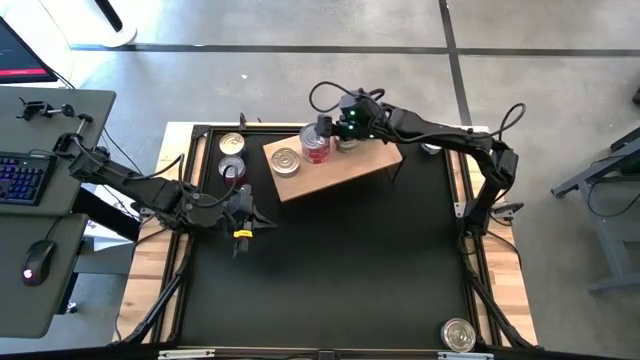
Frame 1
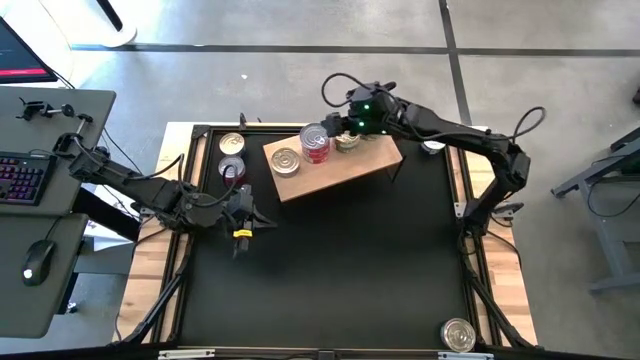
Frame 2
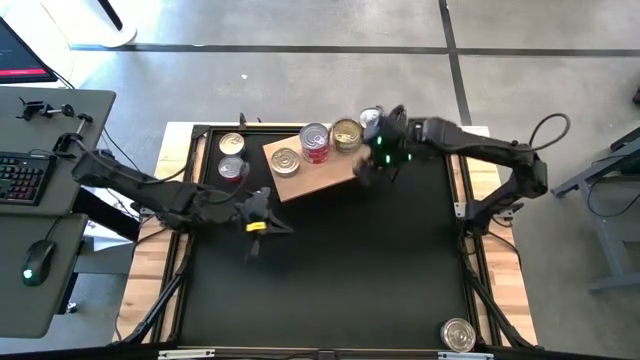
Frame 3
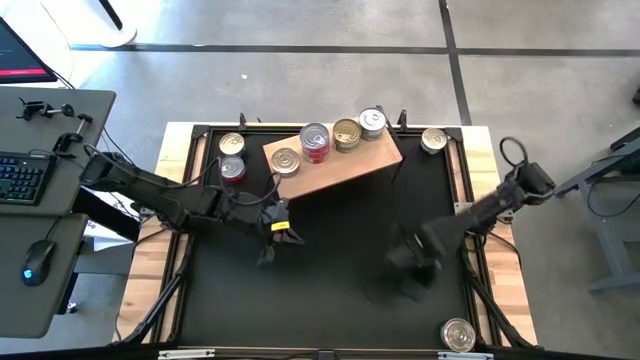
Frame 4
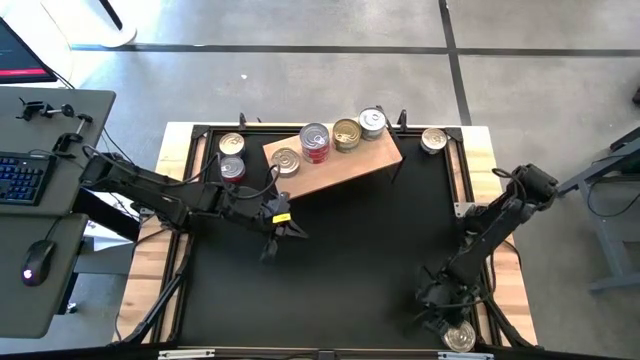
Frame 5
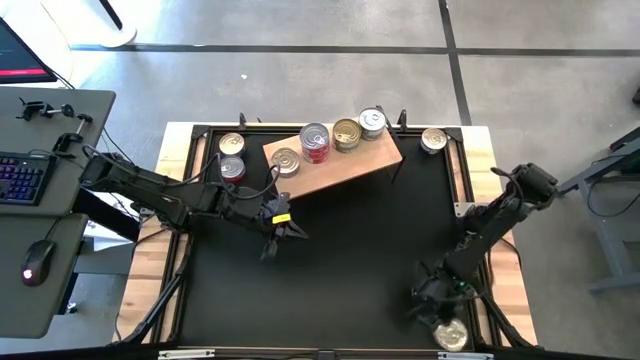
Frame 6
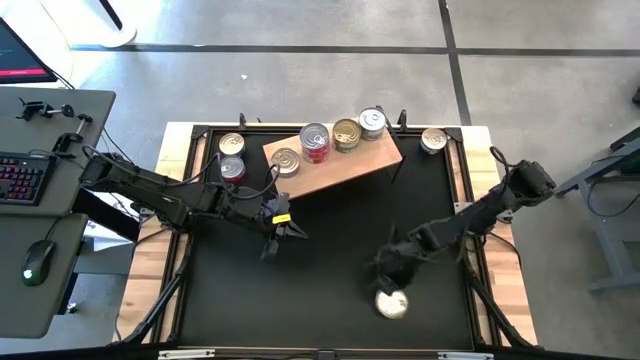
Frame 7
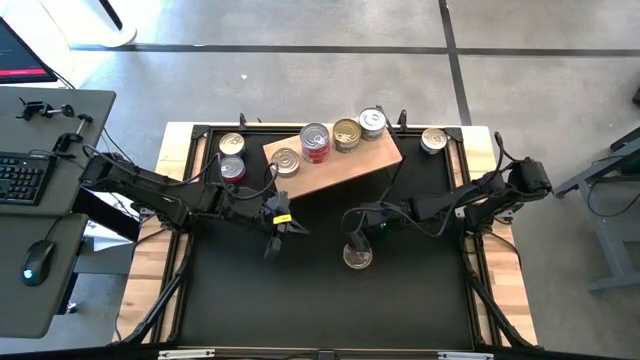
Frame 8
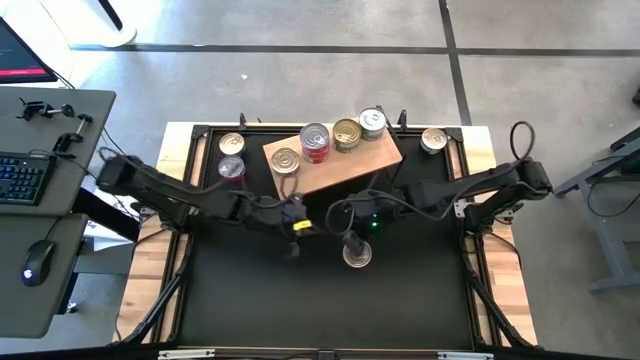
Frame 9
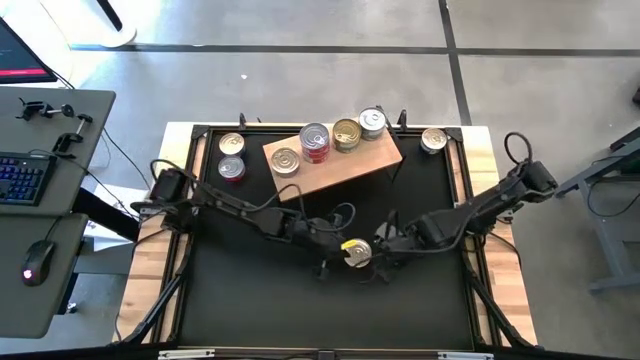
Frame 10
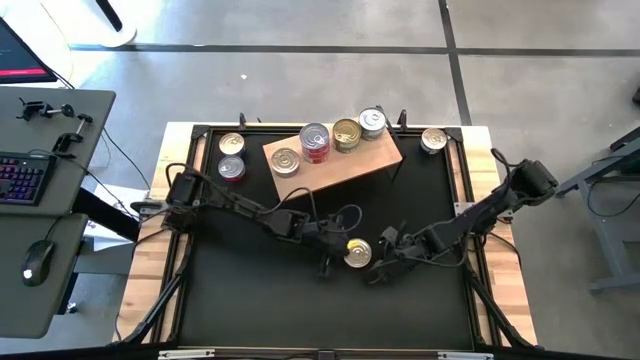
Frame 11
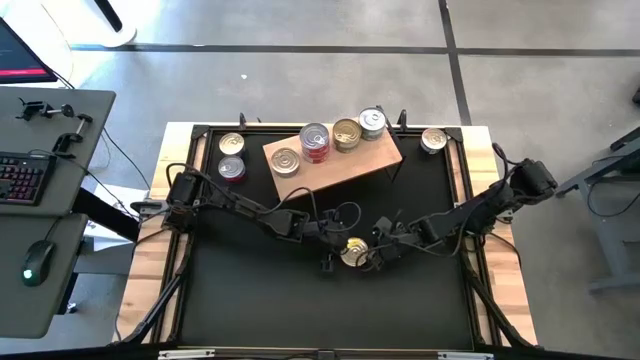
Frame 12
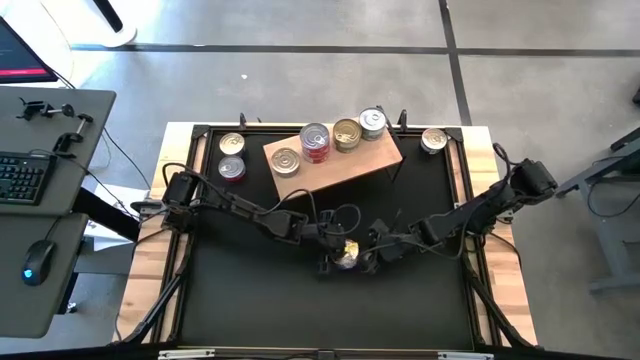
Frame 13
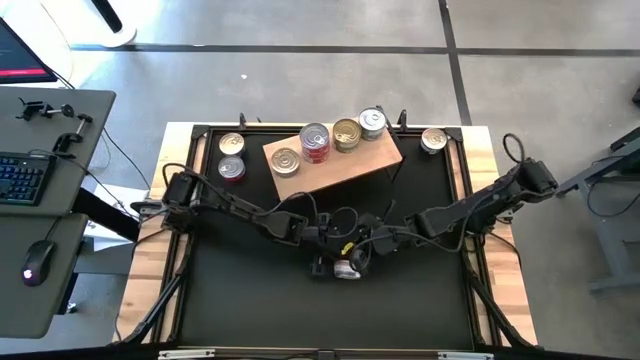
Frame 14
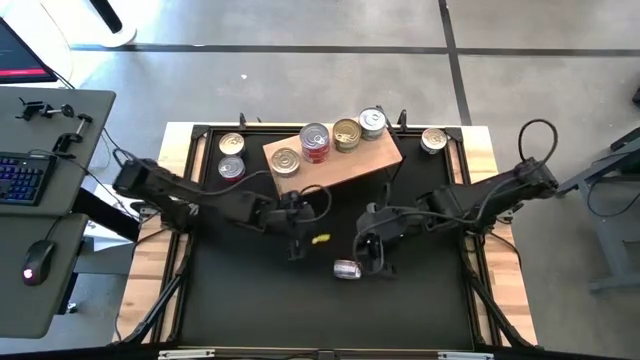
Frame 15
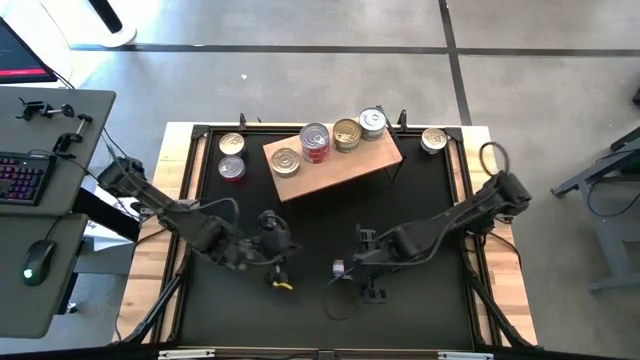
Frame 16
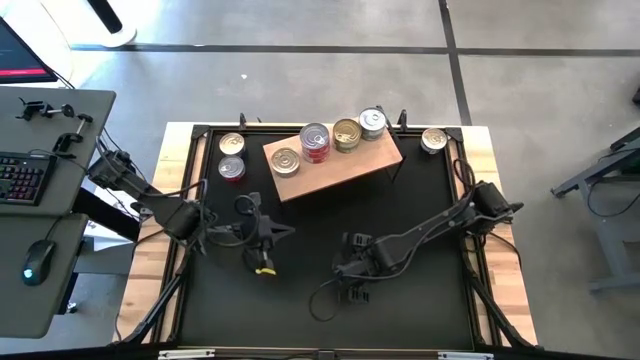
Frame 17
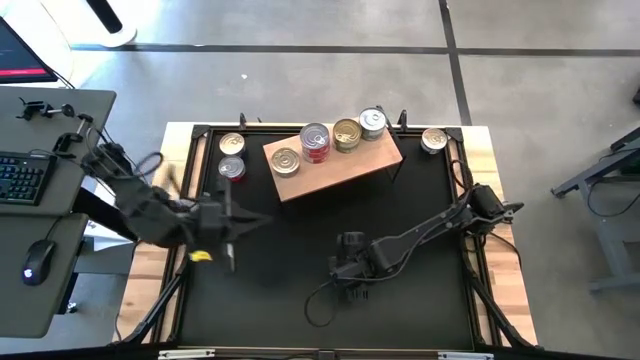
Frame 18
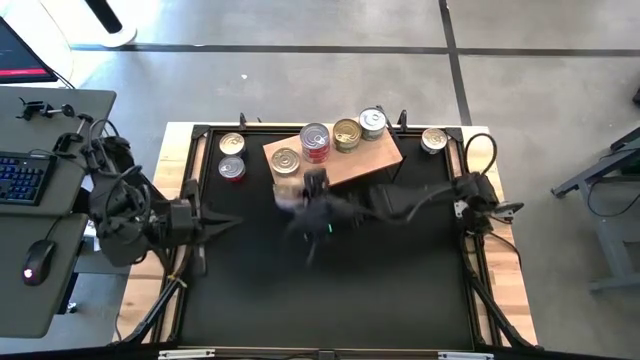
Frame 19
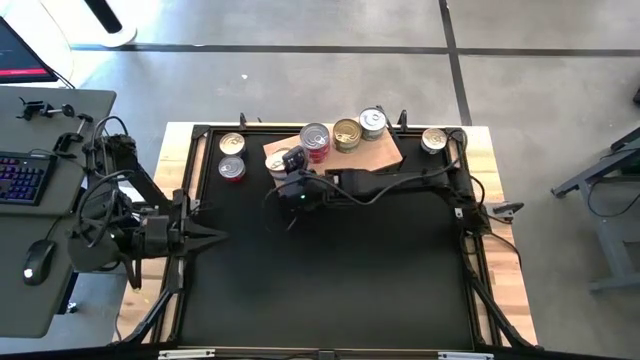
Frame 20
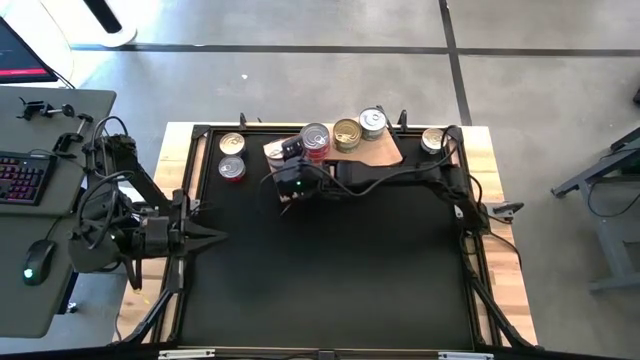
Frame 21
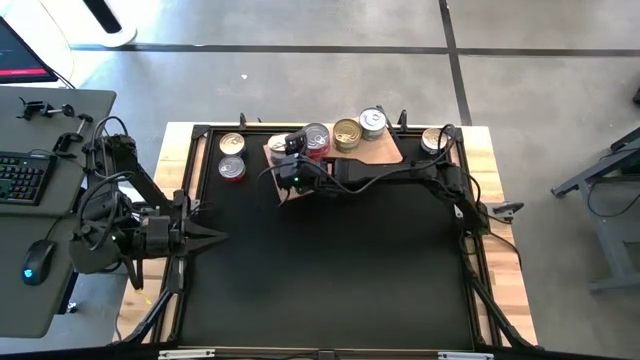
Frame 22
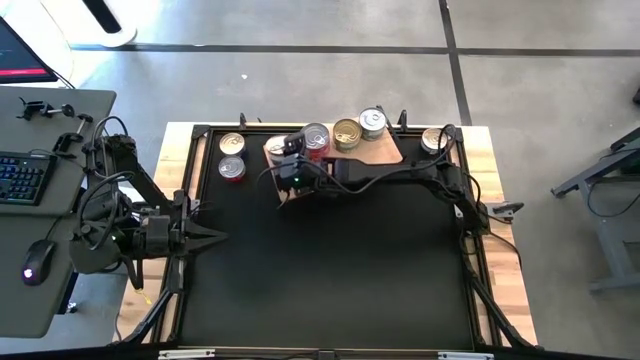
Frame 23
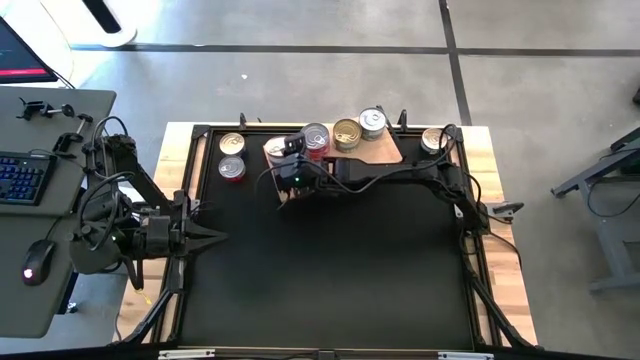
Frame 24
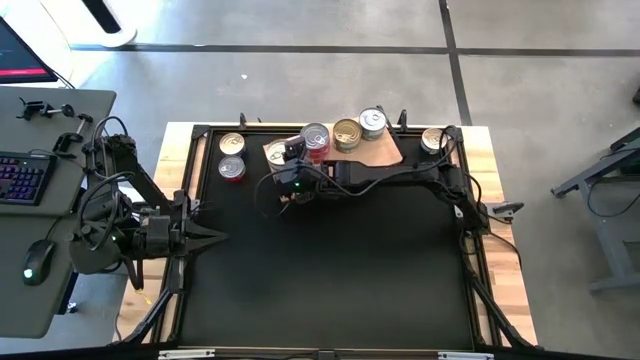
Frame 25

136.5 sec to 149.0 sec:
Task: Stack canned seafood by type on shelf
Stack the bottom blue and red tuna can on top of the blue and red tuna can on the shelf

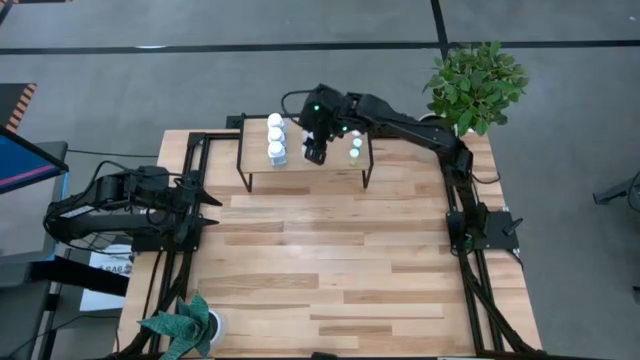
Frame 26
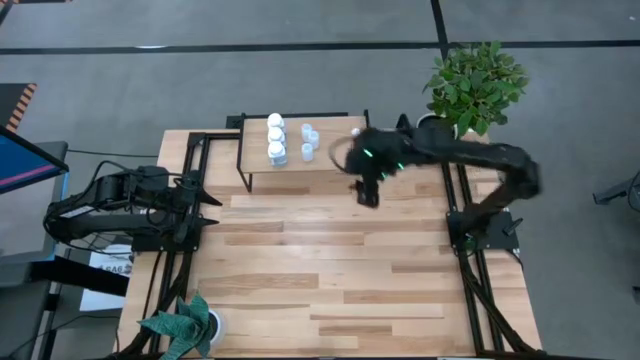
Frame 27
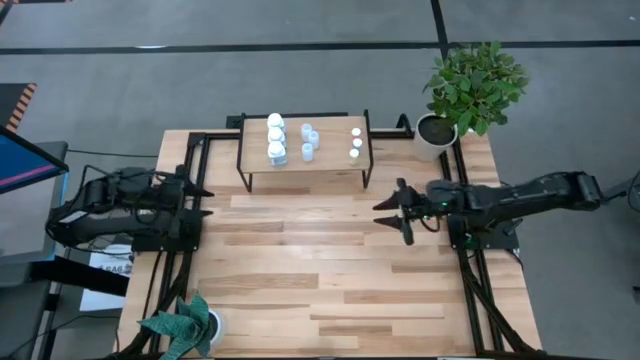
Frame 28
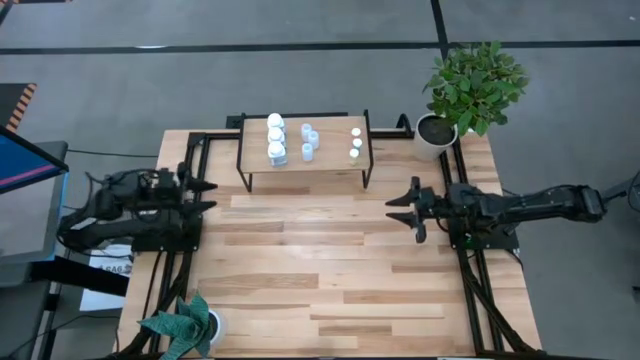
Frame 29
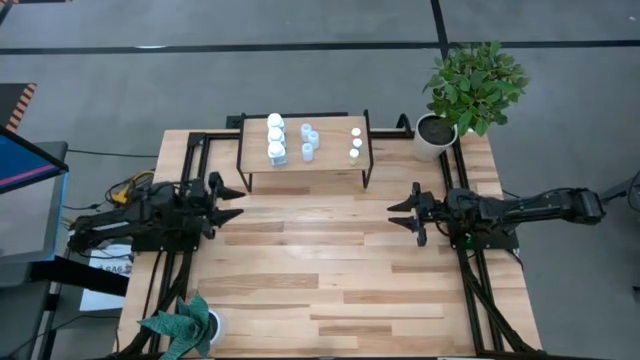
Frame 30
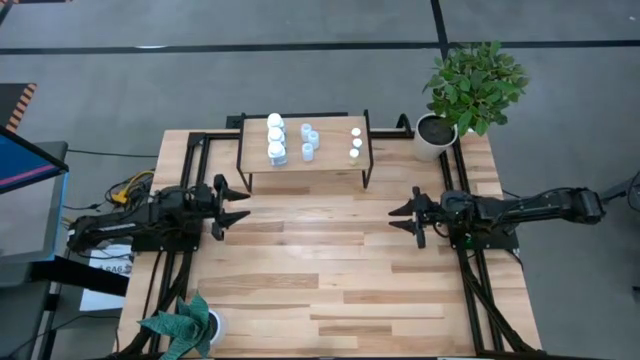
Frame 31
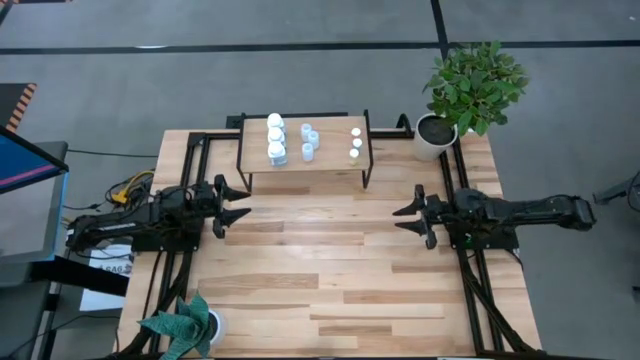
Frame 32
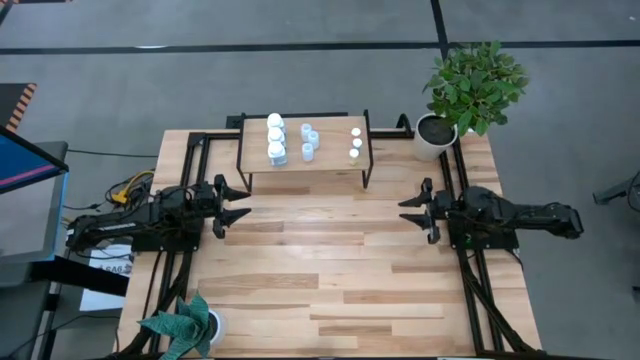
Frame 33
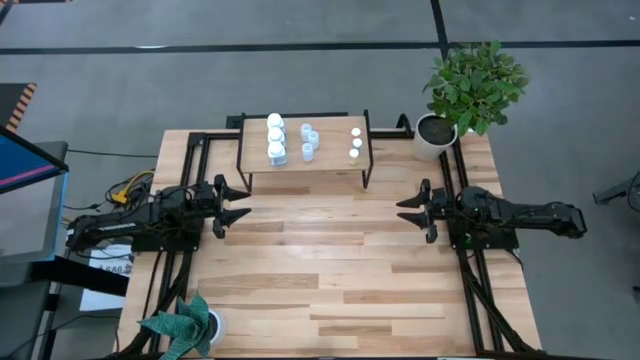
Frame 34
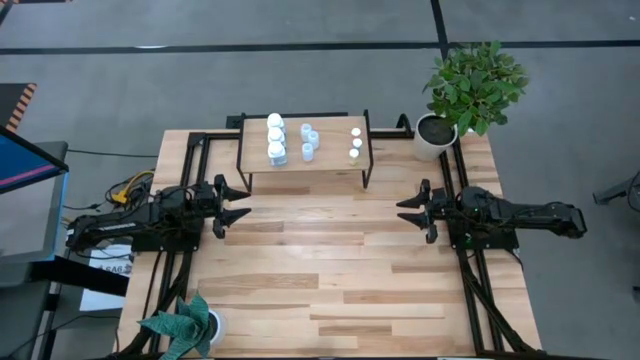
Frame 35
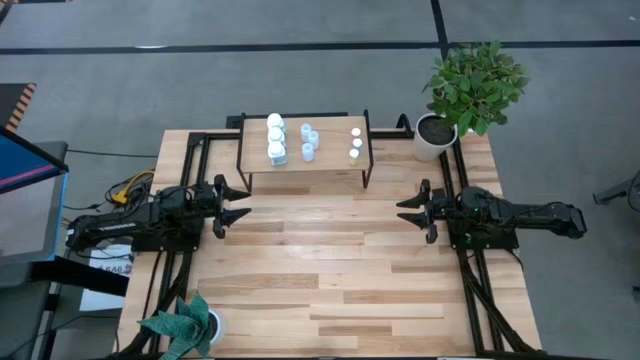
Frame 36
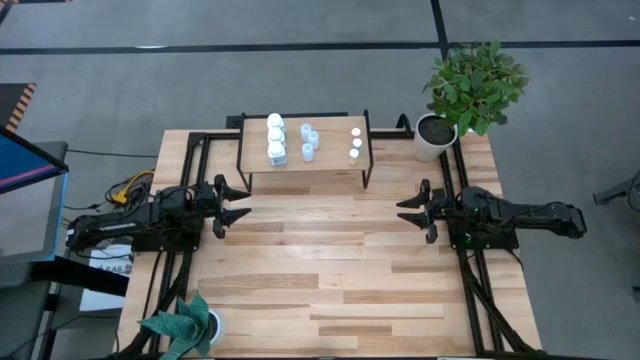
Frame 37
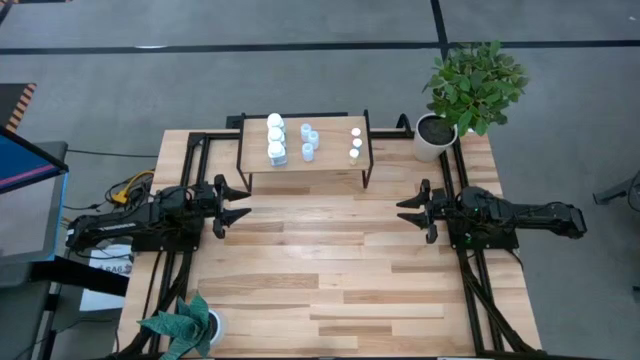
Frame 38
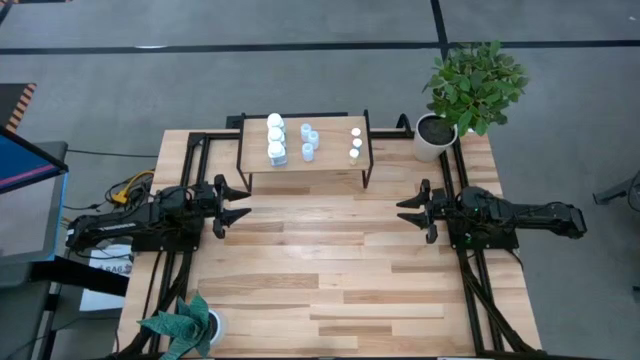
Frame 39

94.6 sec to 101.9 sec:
Task: Pick and place medicine bottles onto shelf by color
Return to Home Position

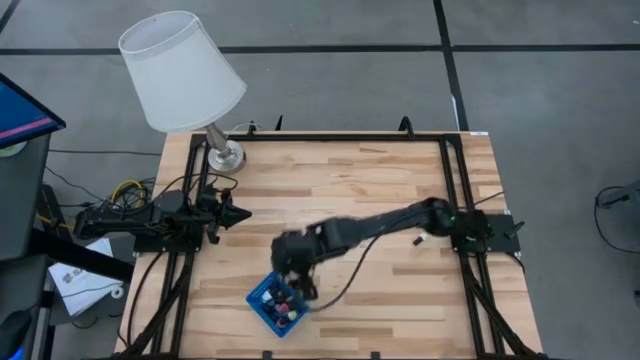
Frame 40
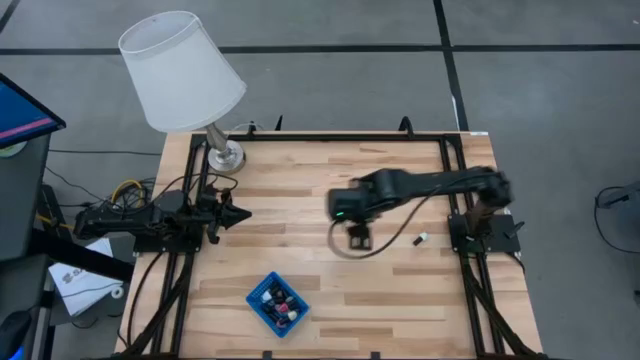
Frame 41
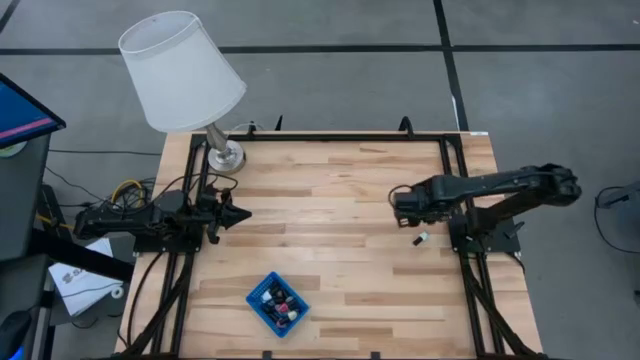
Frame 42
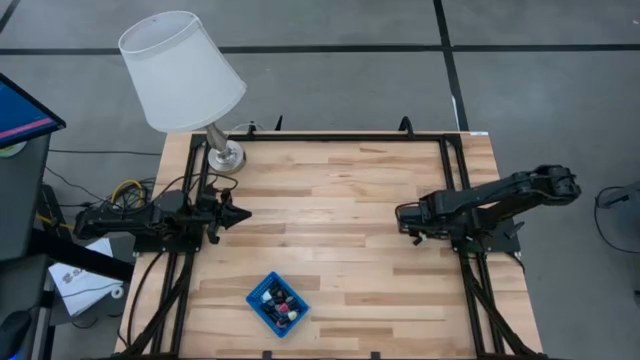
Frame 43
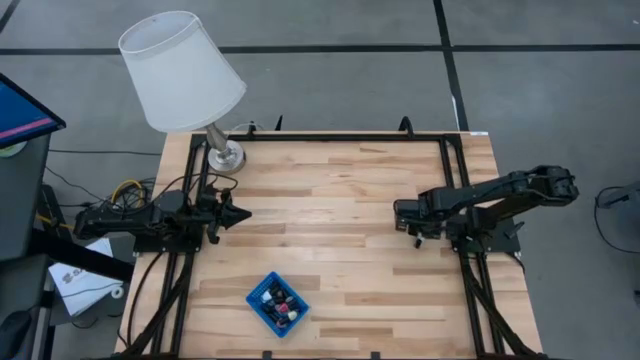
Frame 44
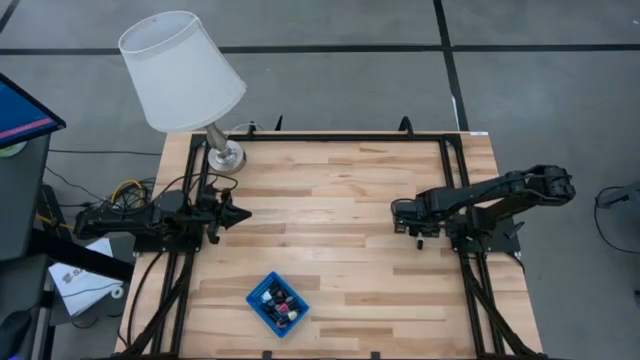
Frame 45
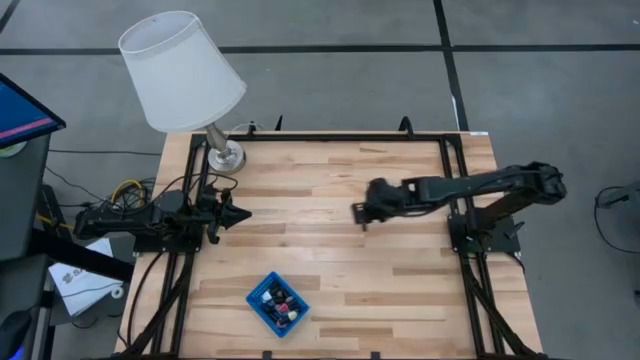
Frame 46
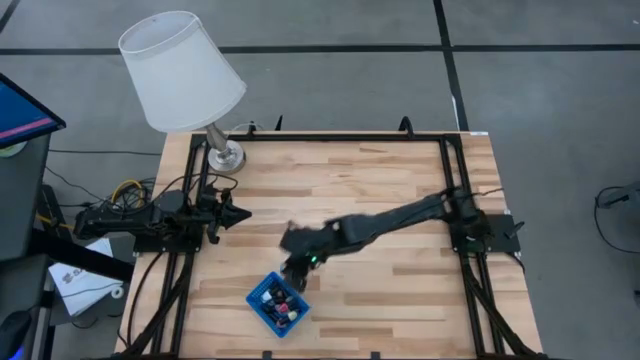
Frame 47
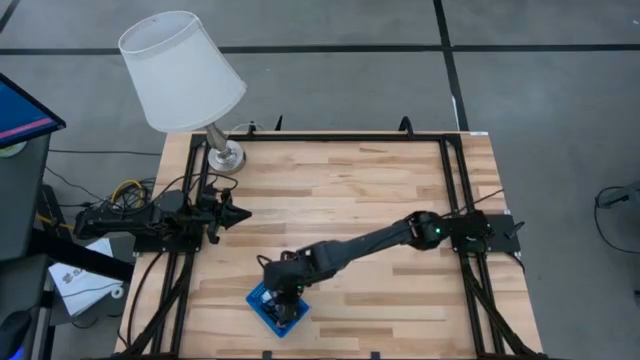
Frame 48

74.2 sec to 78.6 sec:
Task: Pick & Place Nail Polish
Put the white nail polish bottle in the blue bin
